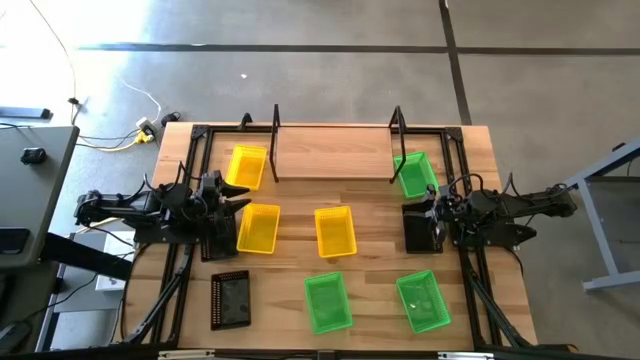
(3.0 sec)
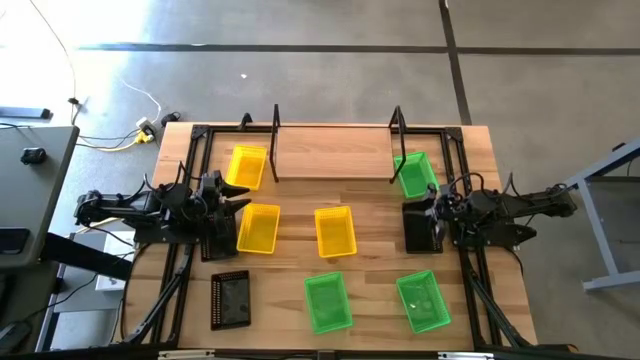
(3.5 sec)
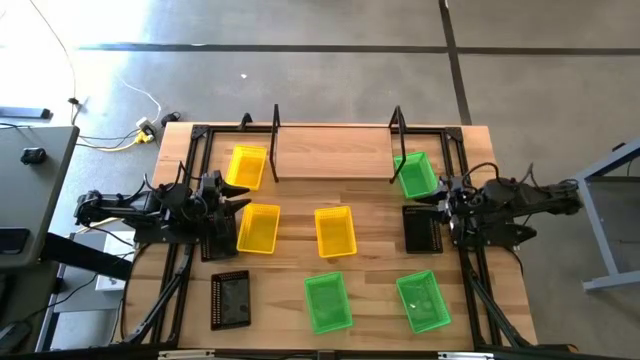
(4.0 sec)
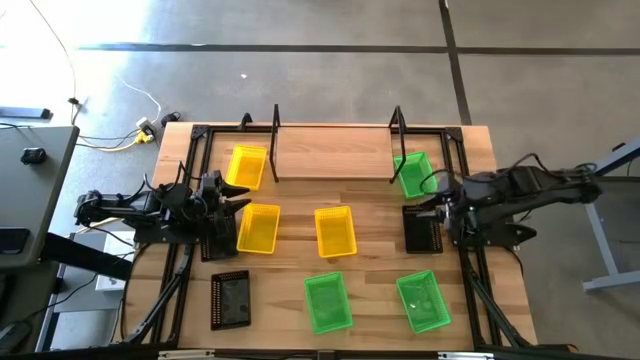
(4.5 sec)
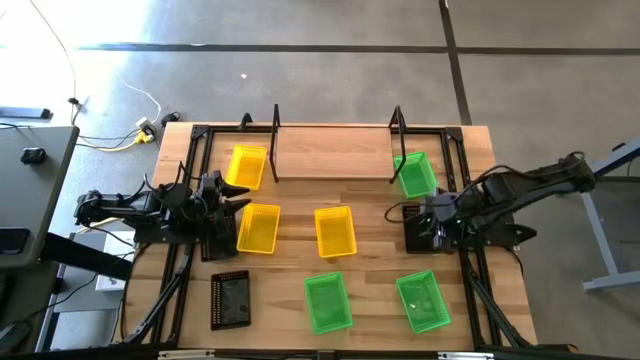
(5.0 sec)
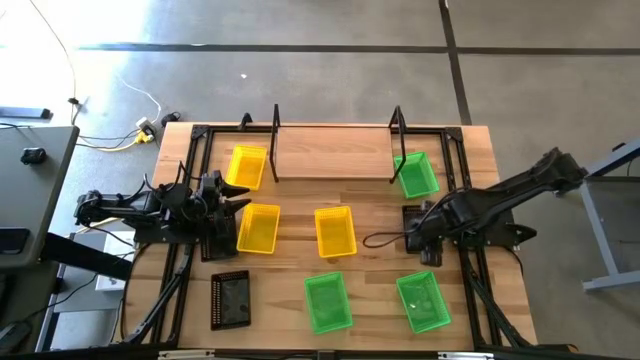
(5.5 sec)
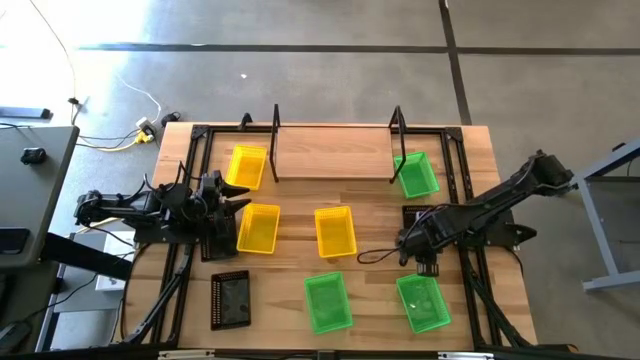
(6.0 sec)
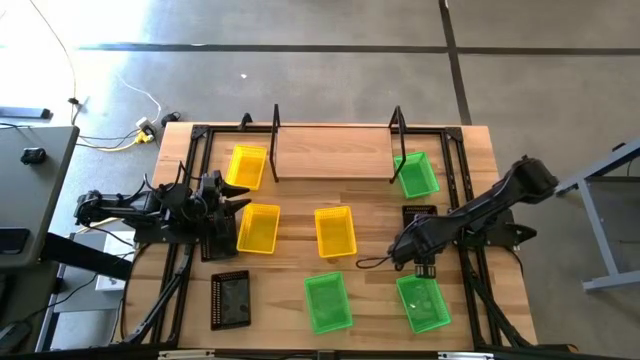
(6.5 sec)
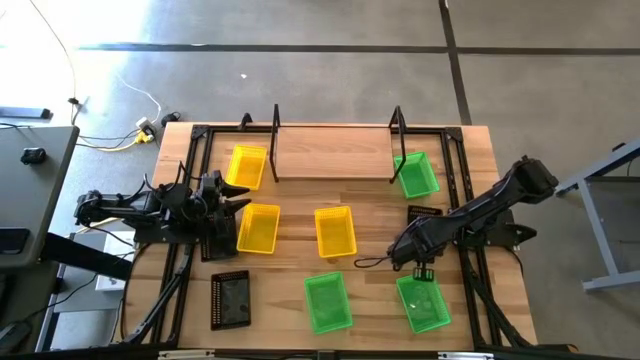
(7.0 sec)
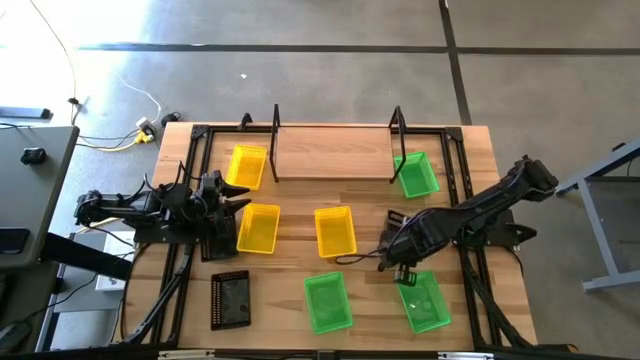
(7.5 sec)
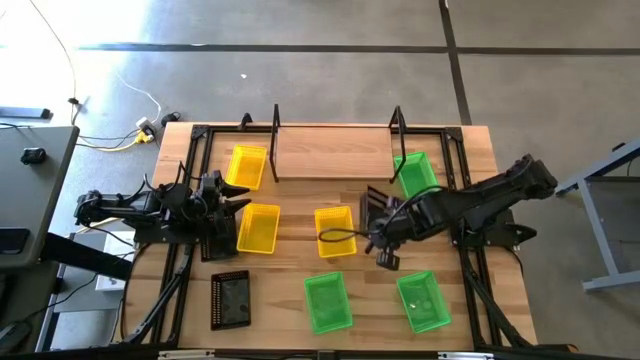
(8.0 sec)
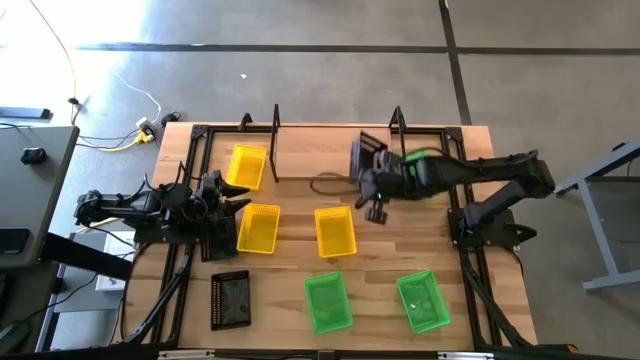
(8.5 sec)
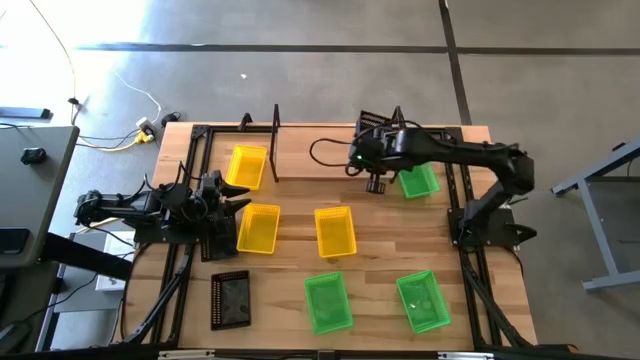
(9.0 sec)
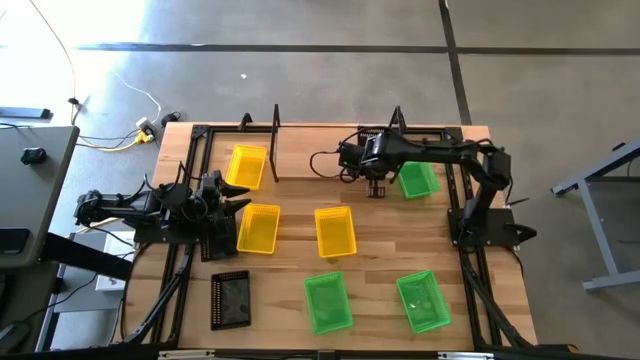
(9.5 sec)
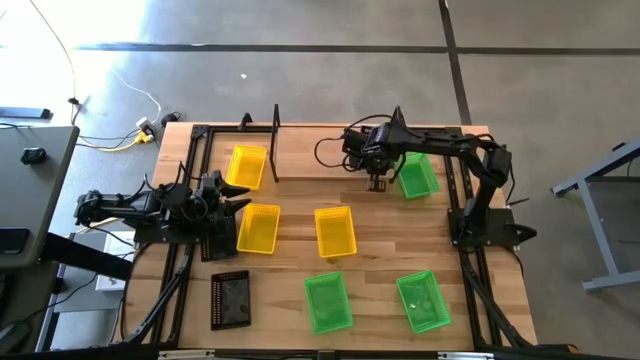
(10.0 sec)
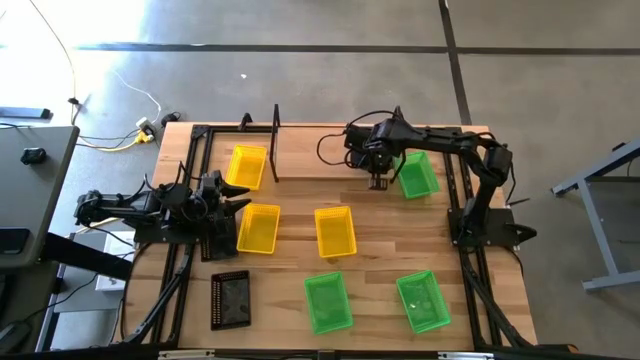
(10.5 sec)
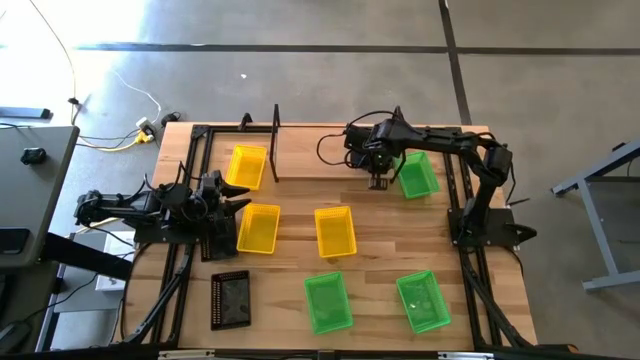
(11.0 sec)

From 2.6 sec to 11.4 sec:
Task: Stack baskets on shelf by color
Put the top right black bin on the shelf

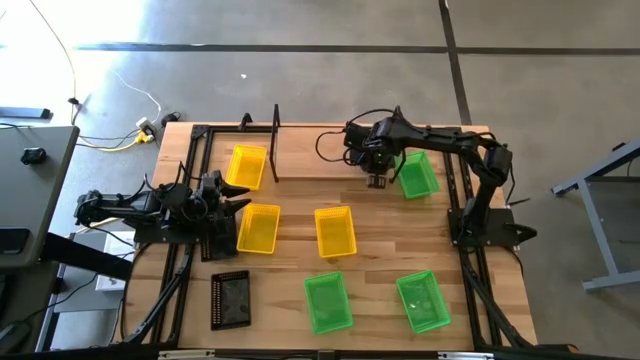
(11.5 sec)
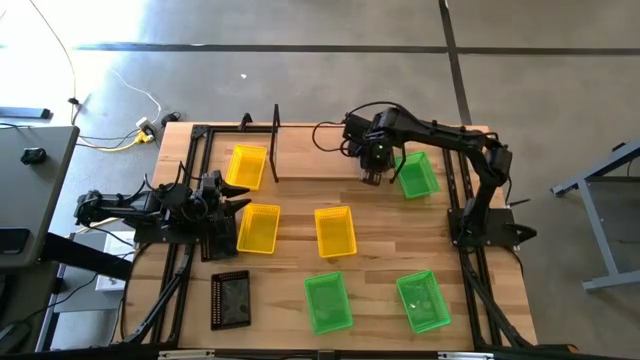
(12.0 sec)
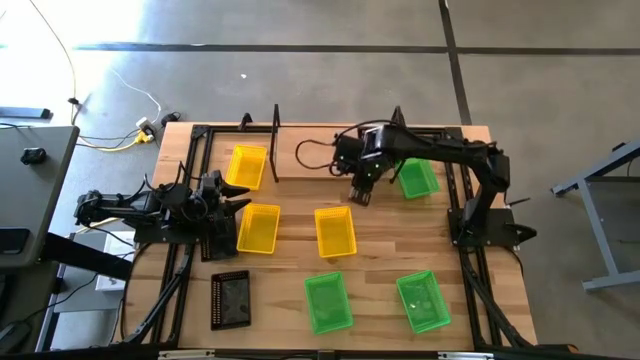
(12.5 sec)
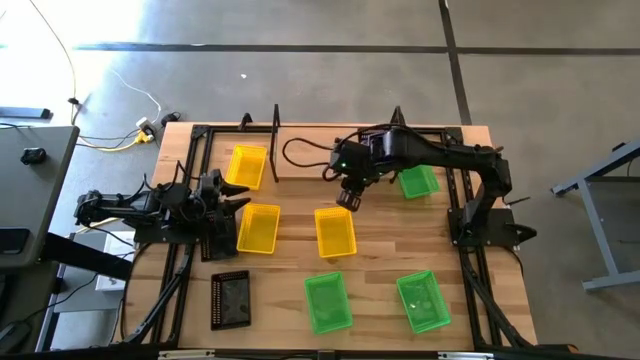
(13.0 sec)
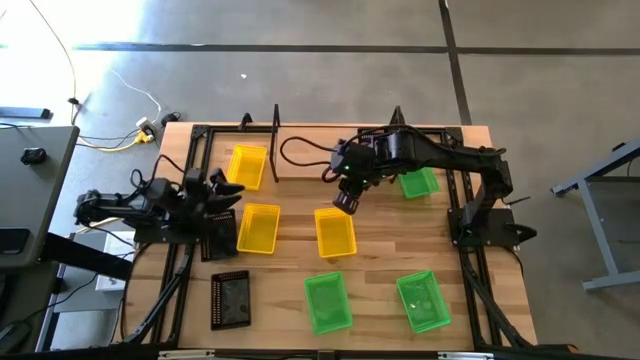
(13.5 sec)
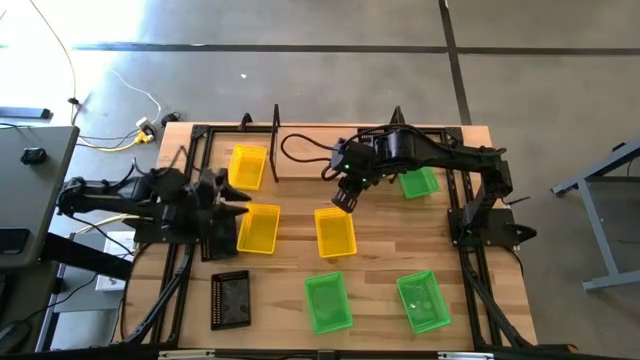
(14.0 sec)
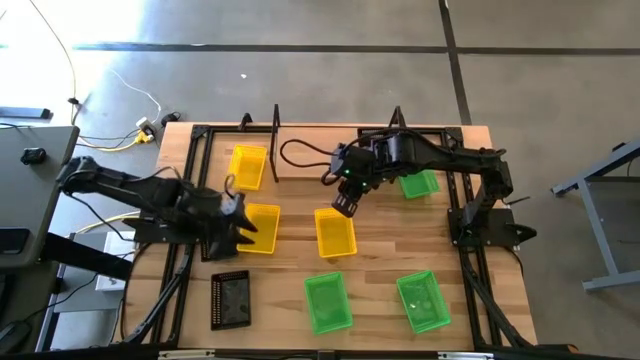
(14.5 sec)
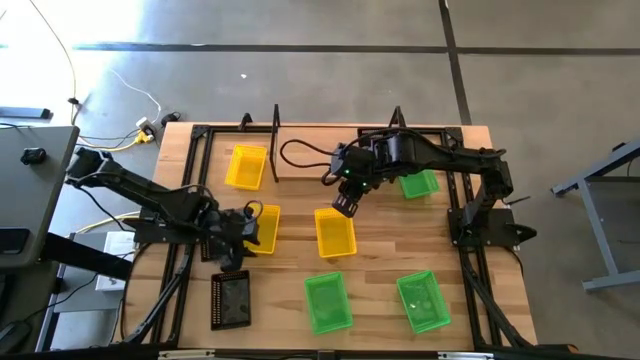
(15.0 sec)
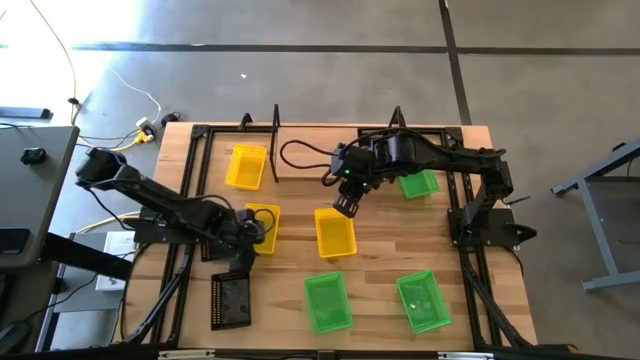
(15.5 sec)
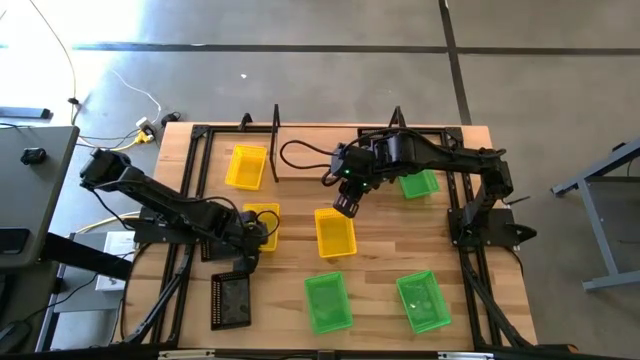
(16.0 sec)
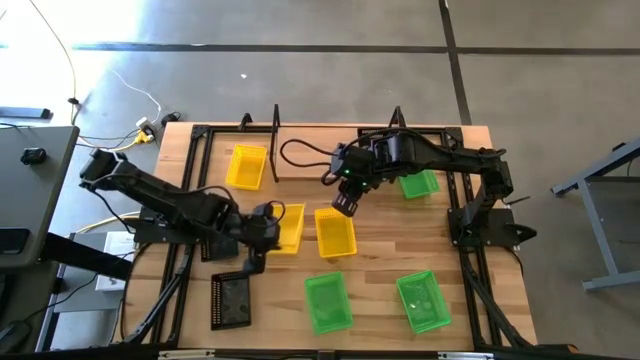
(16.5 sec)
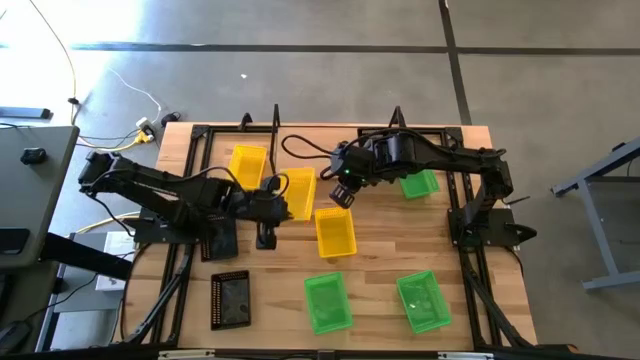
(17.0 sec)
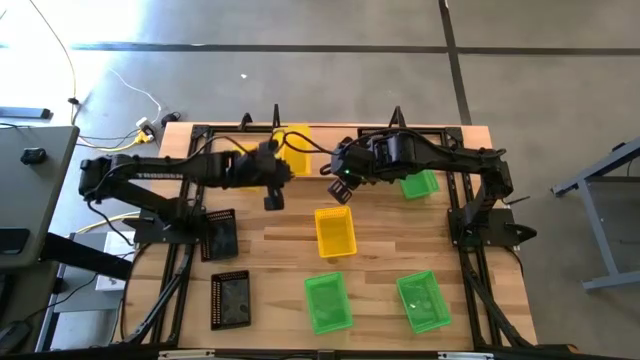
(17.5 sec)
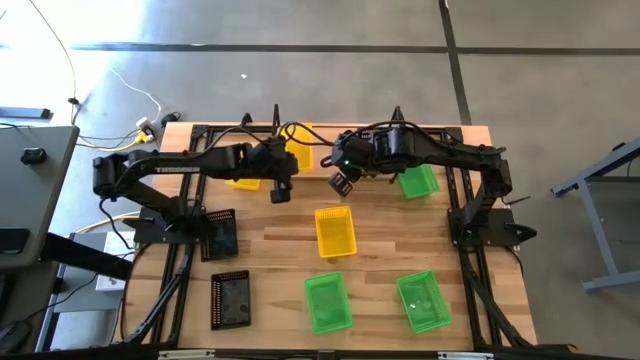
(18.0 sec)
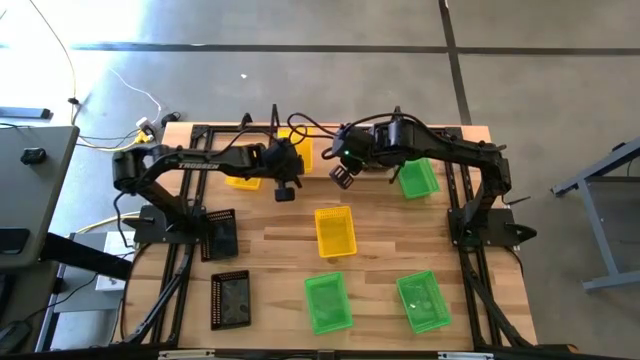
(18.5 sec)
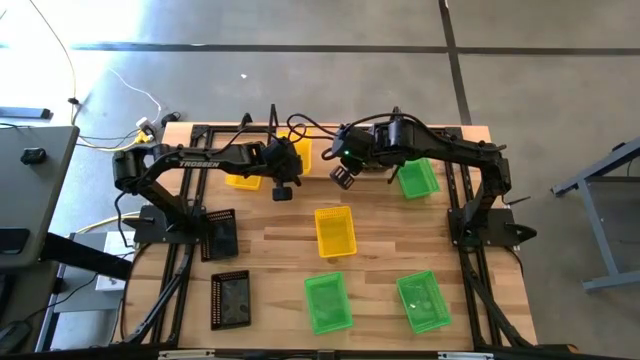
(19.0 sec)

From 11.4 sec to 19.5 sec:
Put the bottom left yellow bin on the shelf

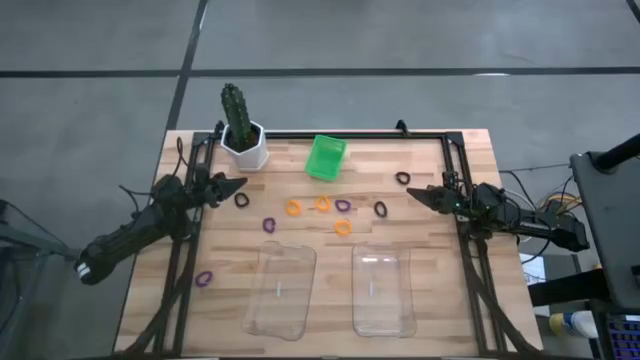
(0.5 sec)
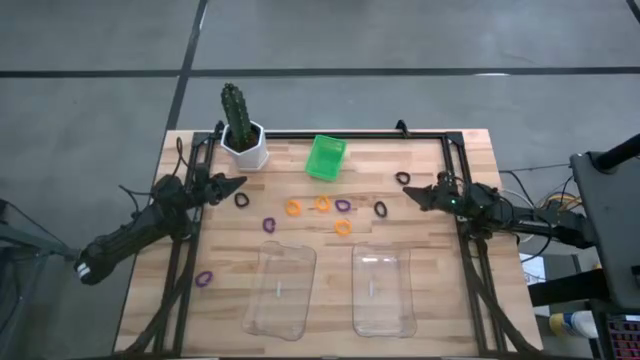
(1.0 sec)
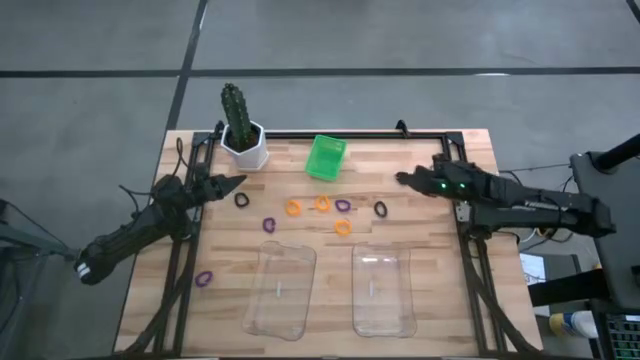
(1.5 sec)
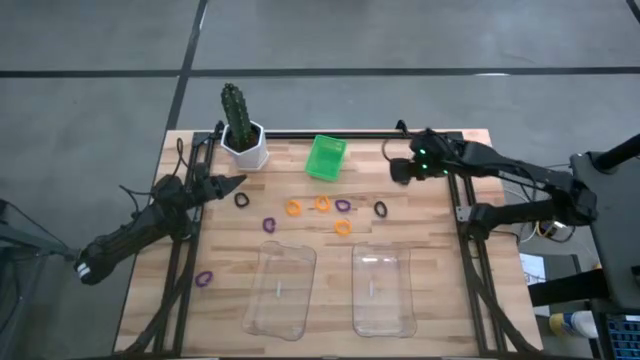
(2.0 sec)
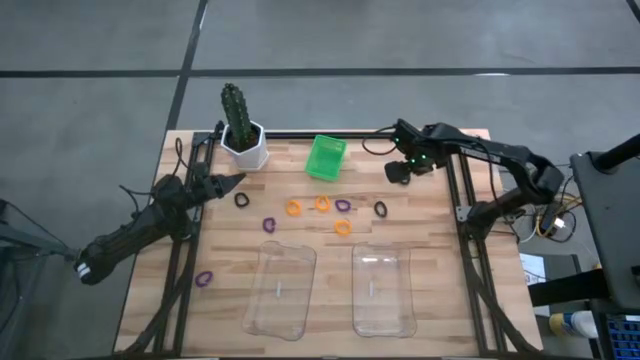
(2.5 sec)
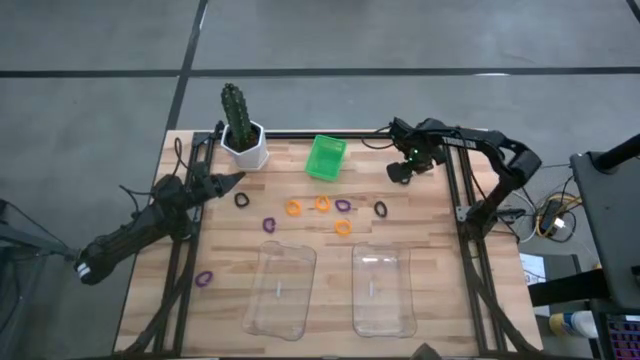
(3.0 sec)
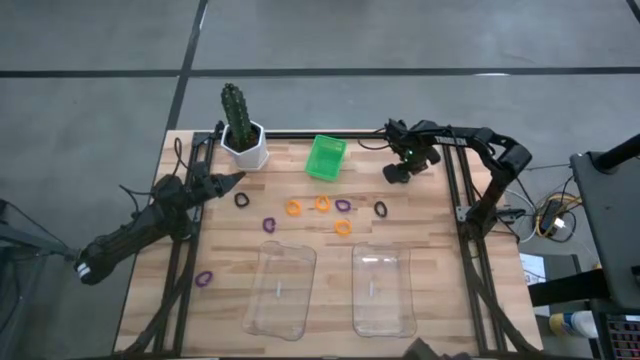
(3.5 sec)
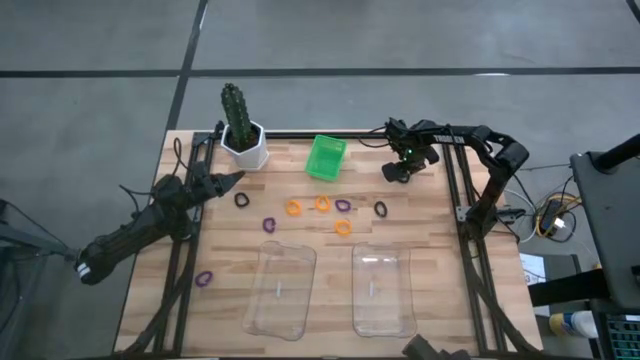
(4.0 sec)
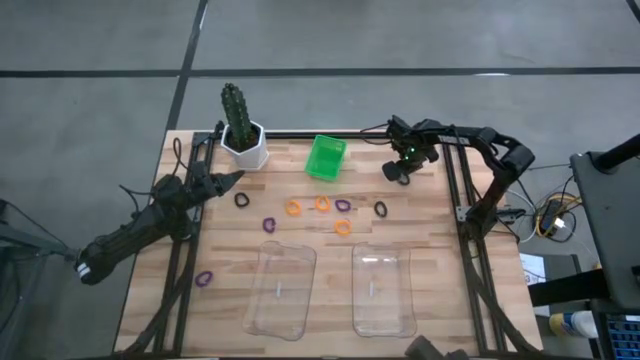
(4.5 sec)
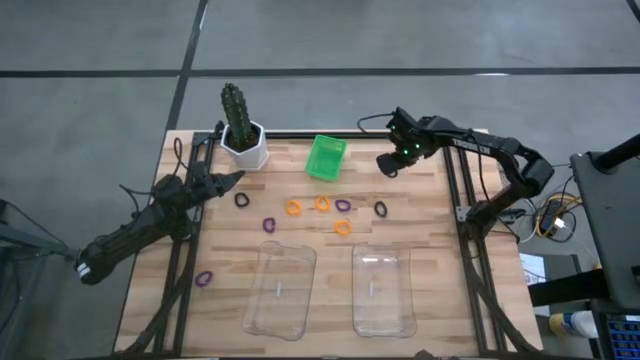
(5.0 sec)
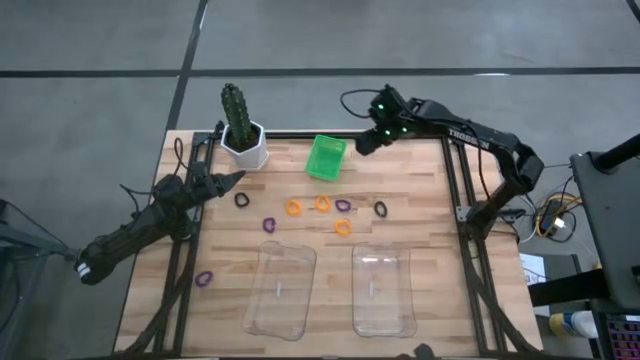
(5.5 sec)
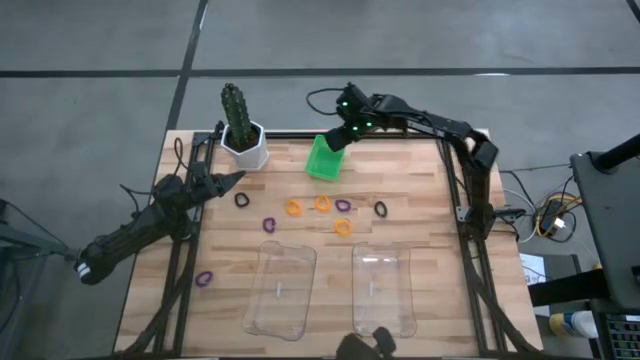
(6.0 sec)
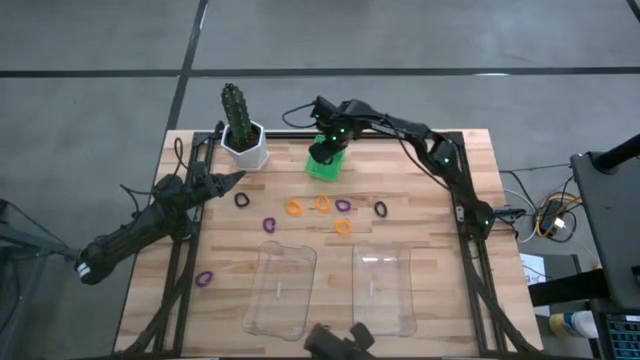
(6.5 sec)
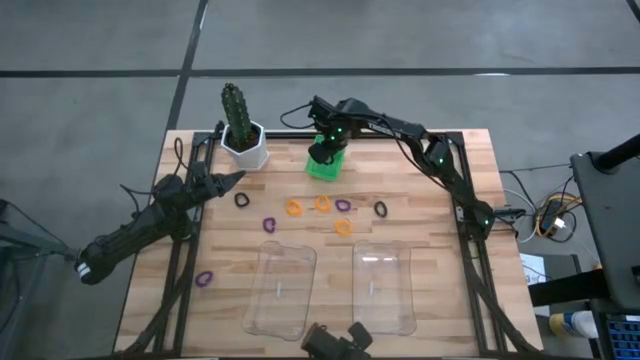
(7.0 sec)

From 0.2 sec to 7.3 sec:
Task: Sort spring keychains
Put the top black spring keychain into the green bin
